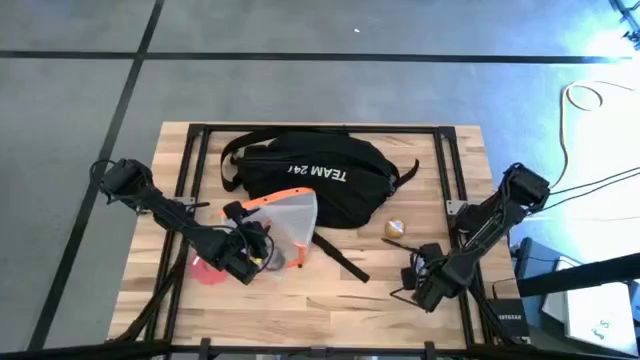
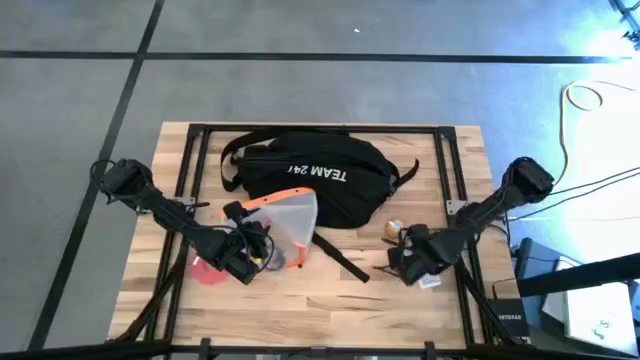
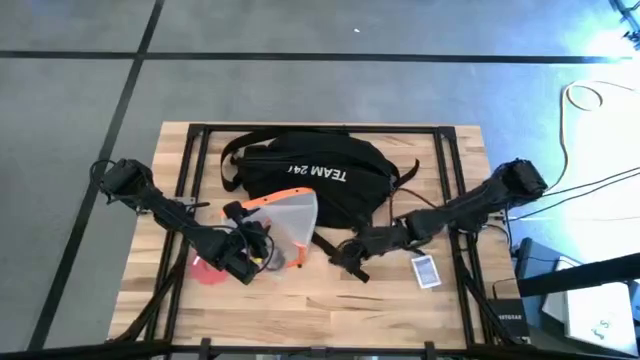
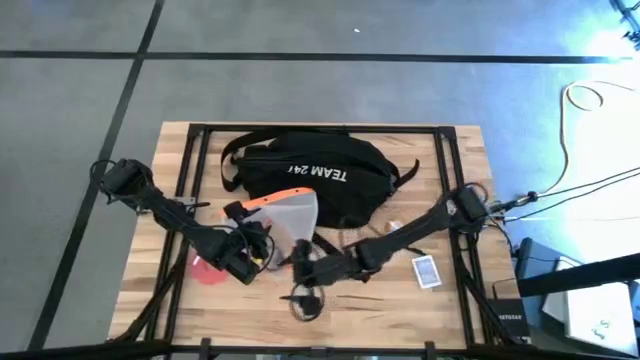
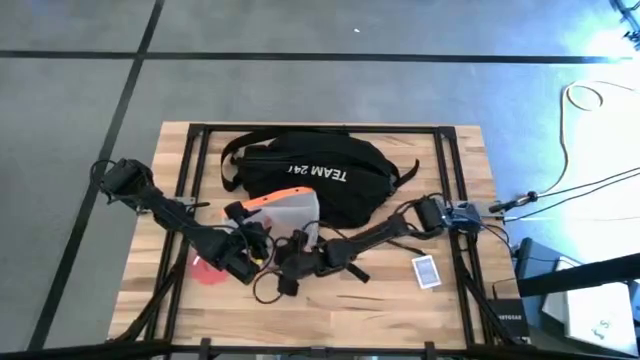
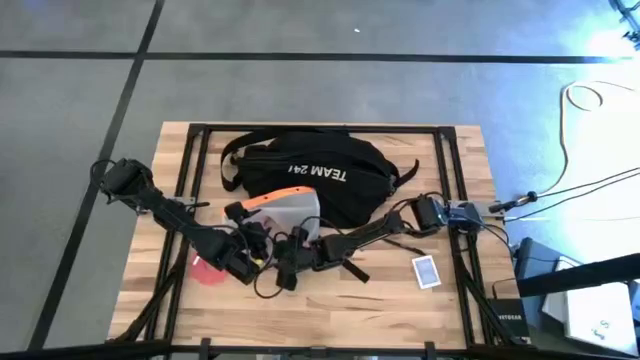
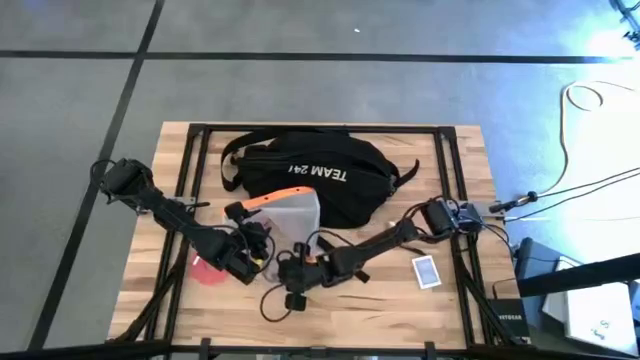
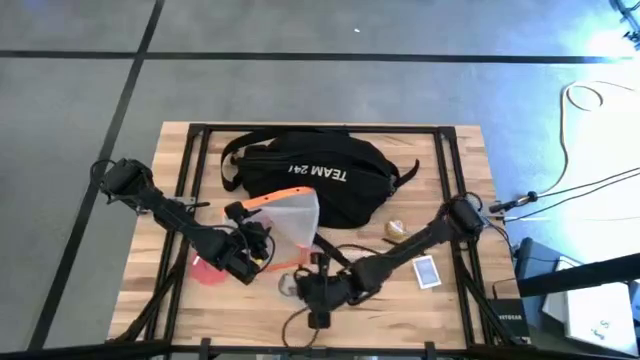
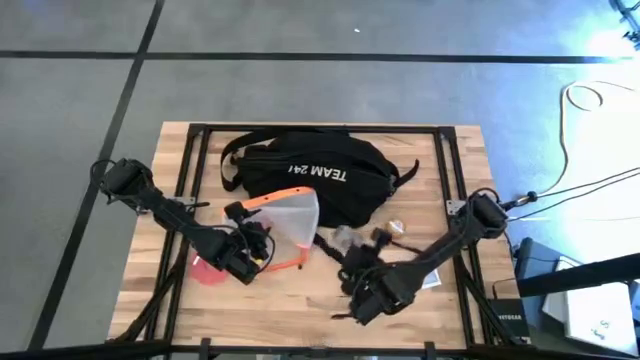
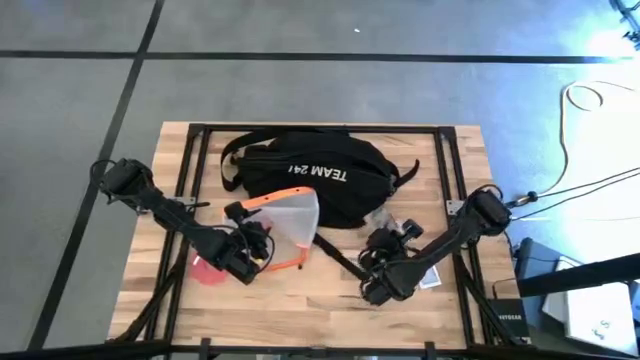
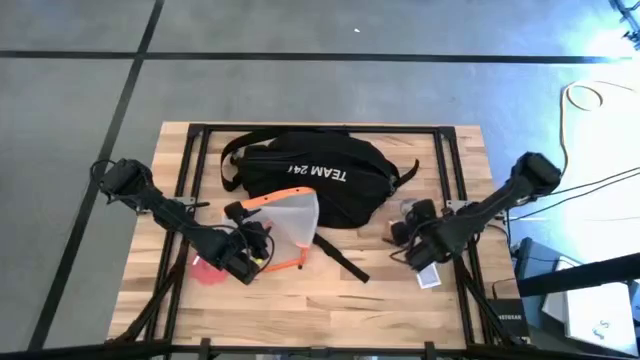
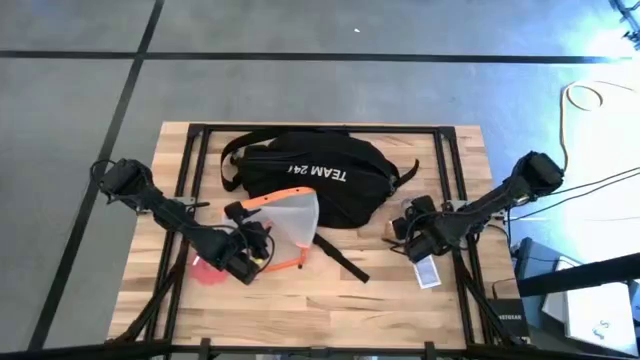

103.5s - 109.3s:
Task: Unpack backpack
Remove the black earphone from the white zip bag

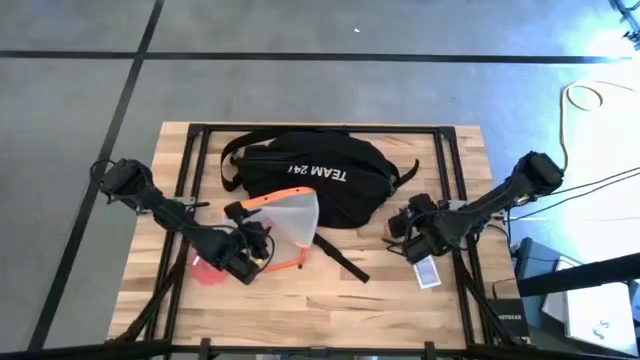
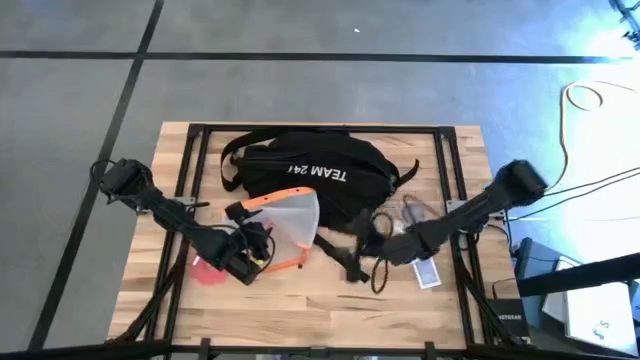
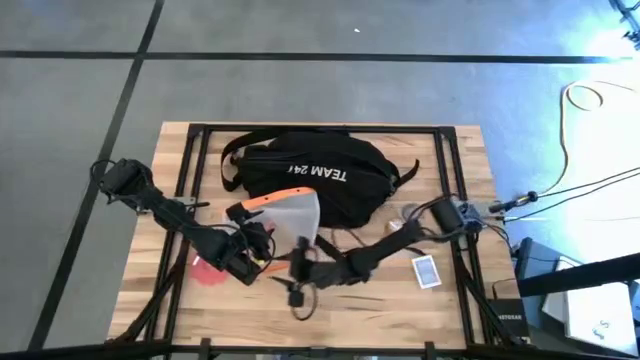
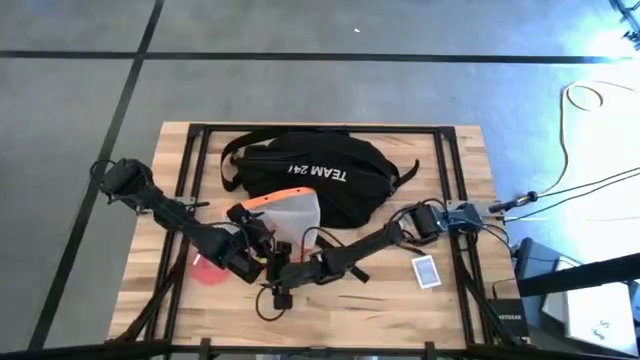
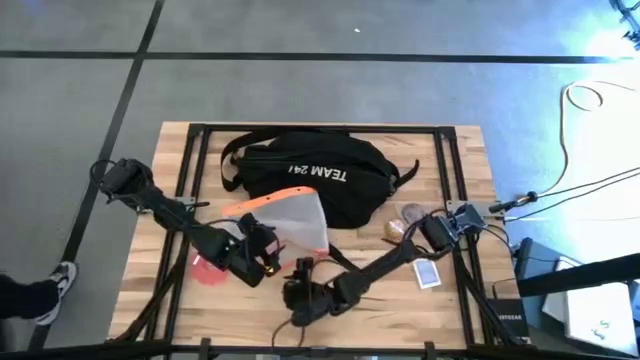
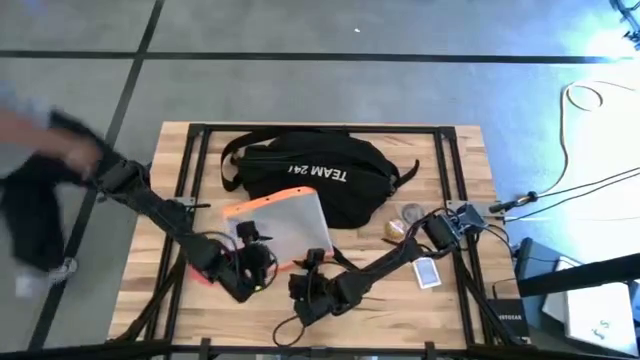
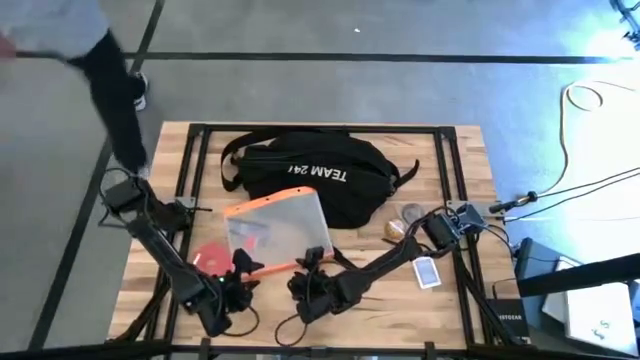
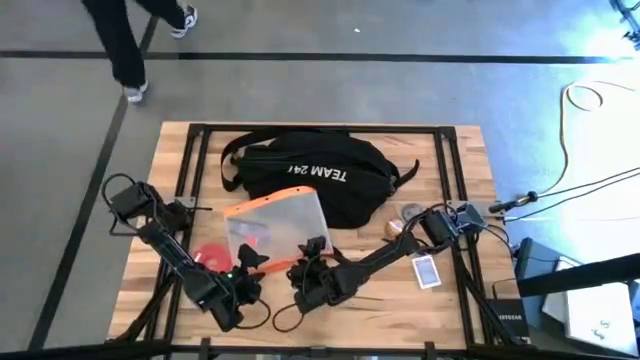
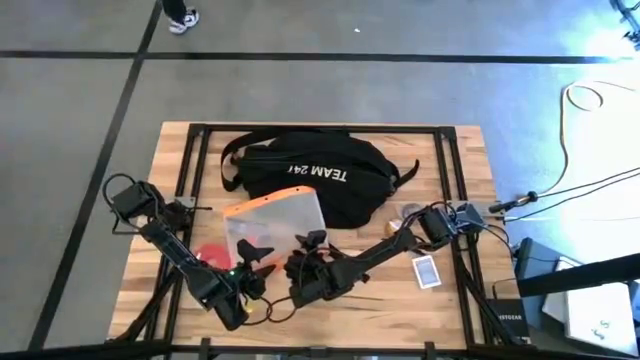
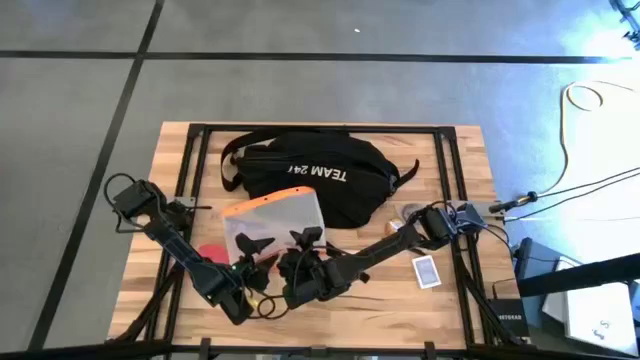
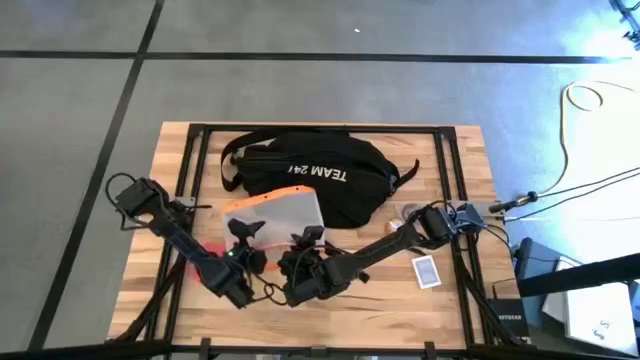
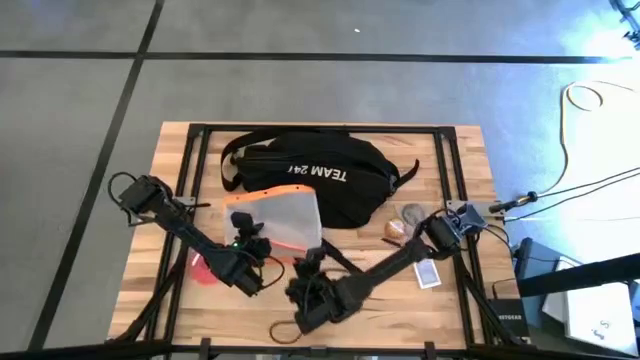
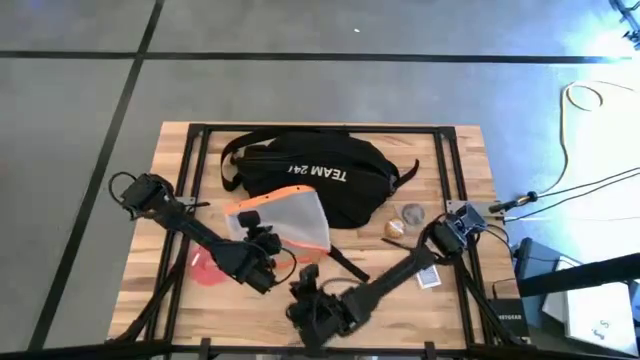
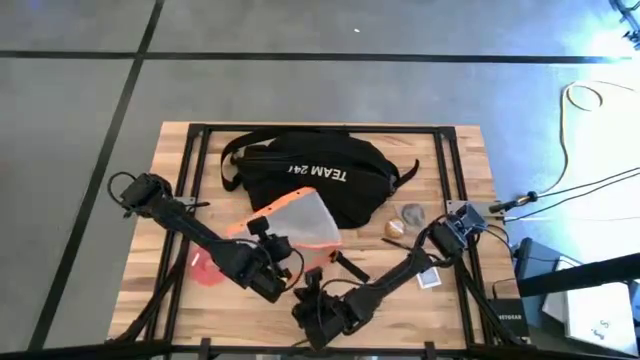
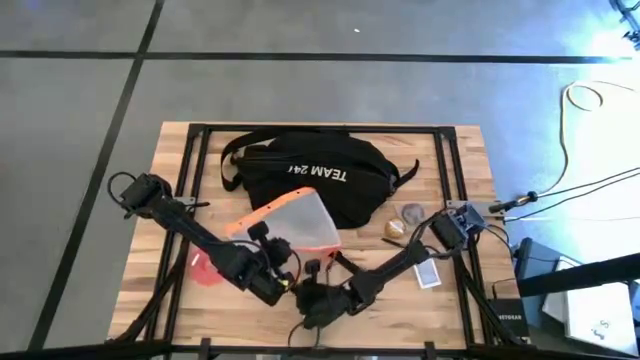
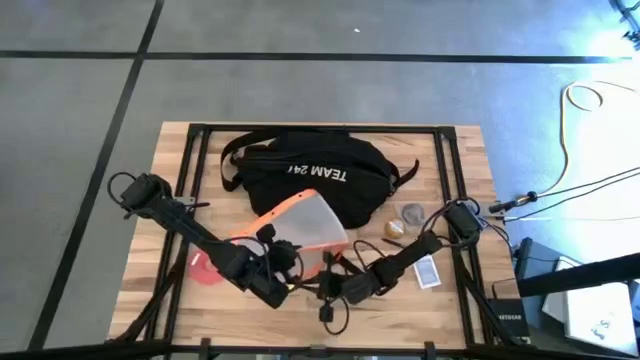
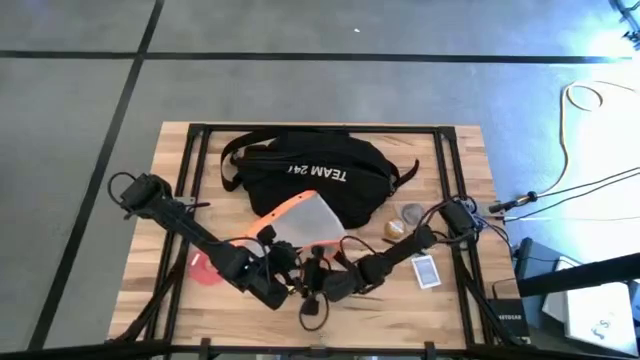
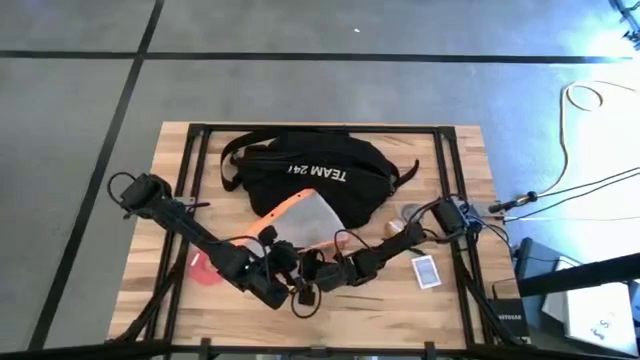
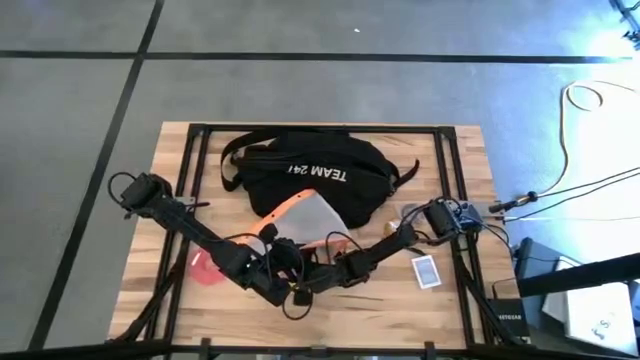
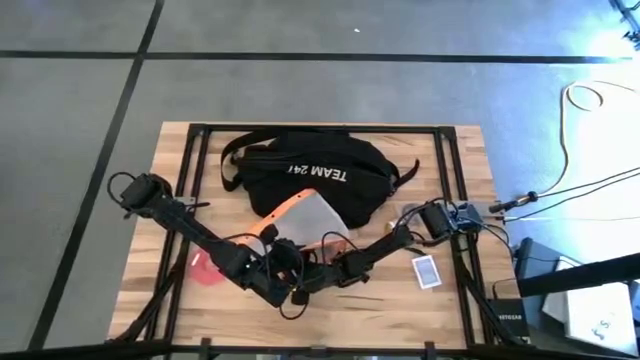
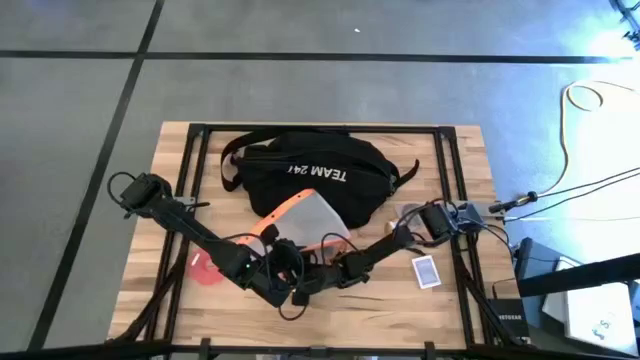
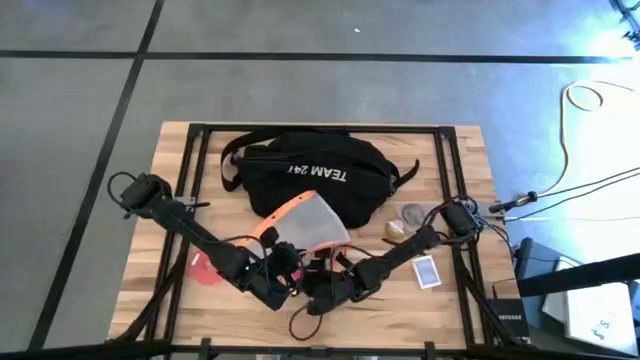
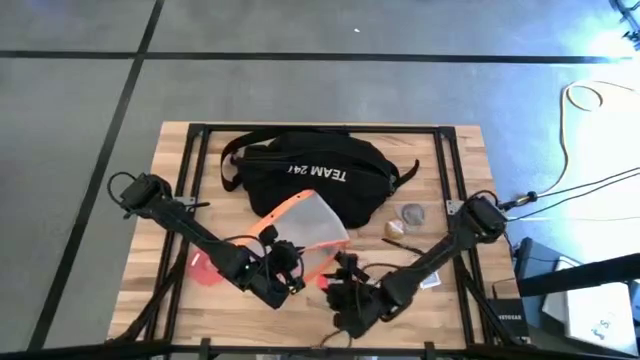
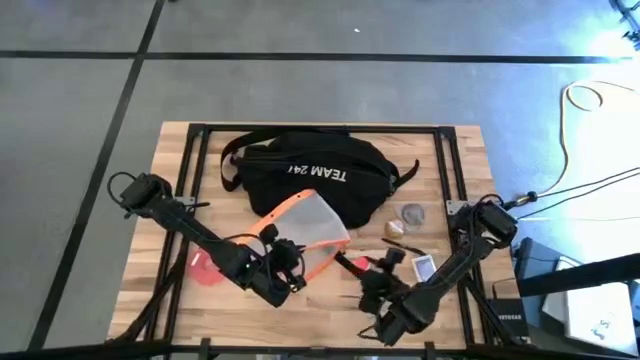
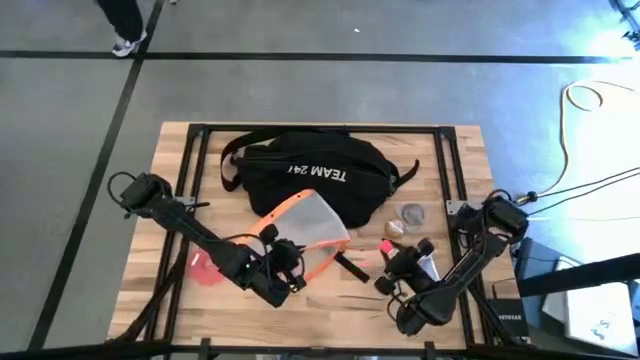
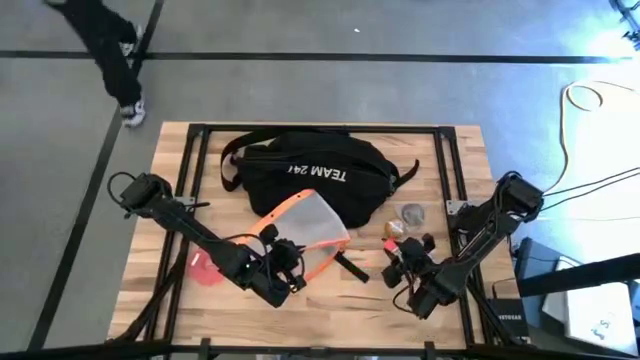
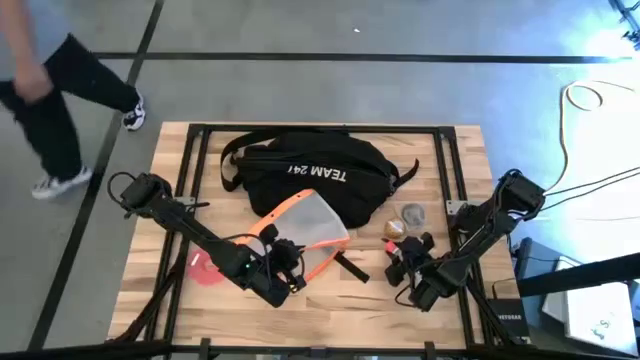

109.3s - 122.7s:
Remove the orange charger adapter from the white zip bag

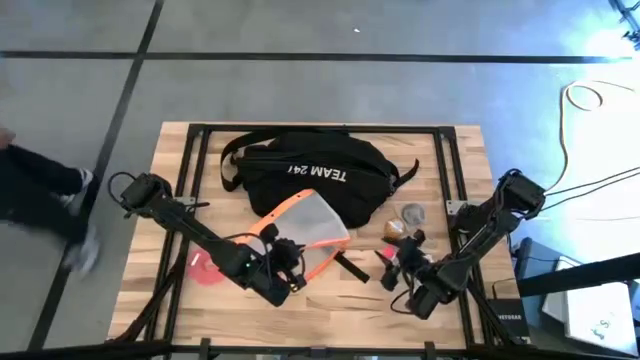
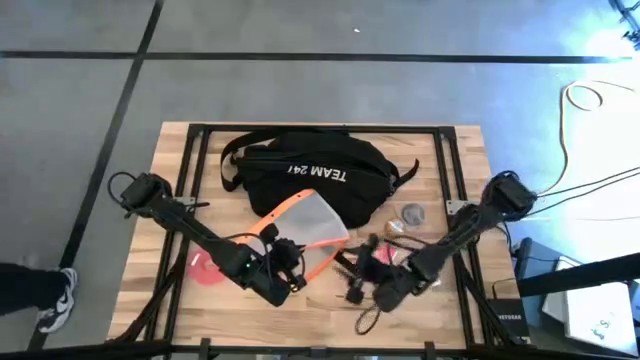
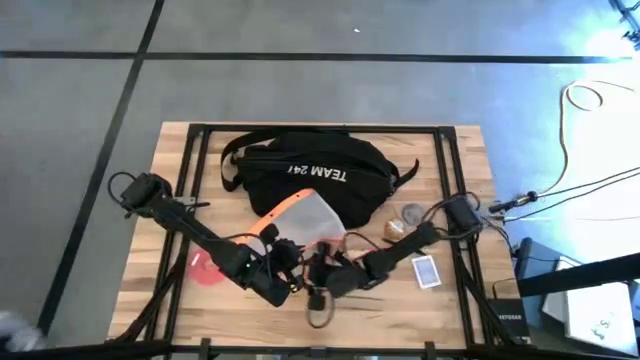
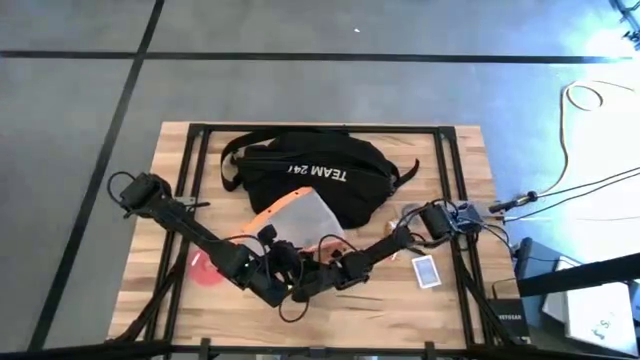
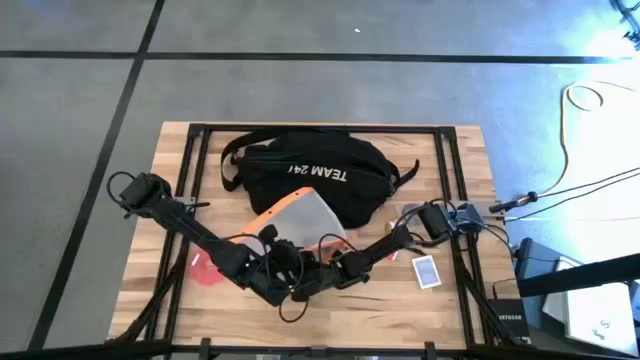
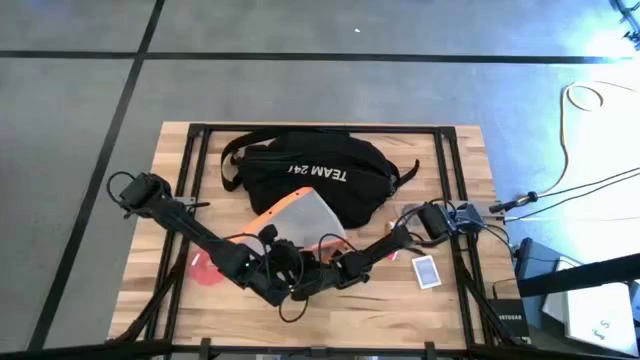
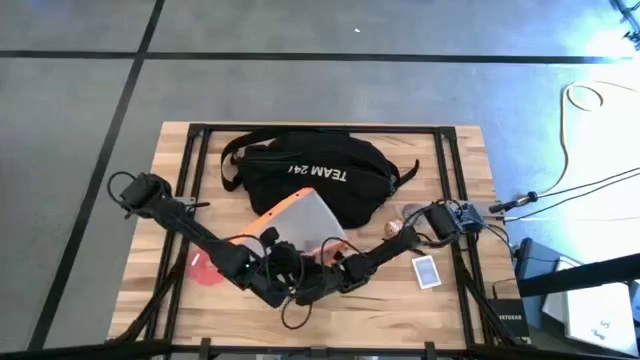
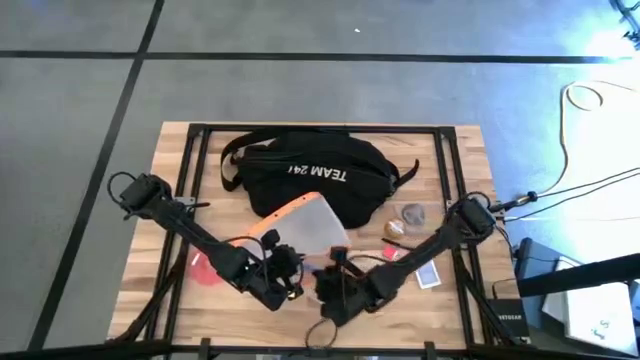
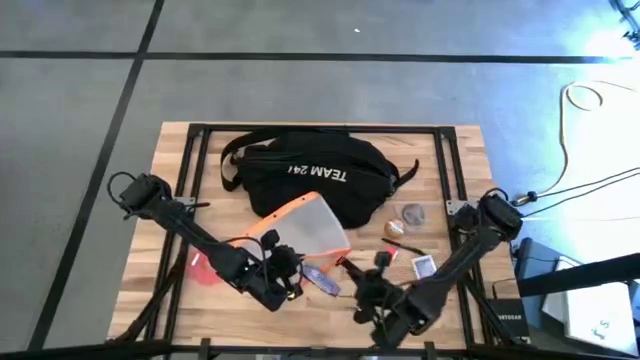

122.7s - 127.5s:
Remove the chocolate bar from the white zip bag
